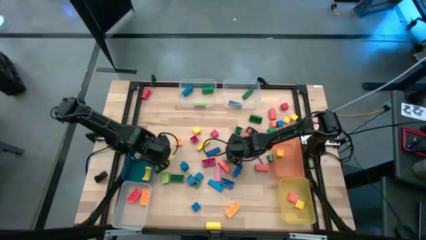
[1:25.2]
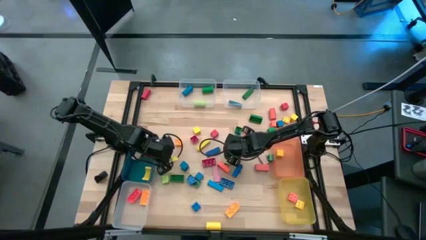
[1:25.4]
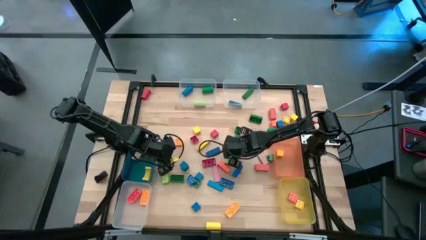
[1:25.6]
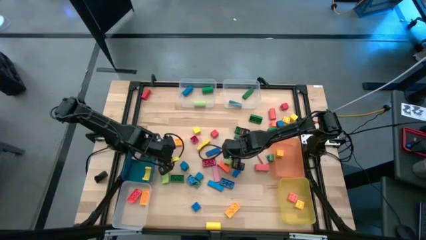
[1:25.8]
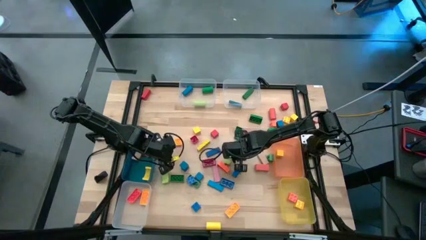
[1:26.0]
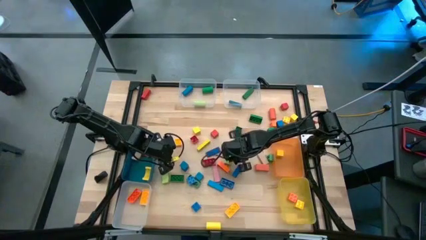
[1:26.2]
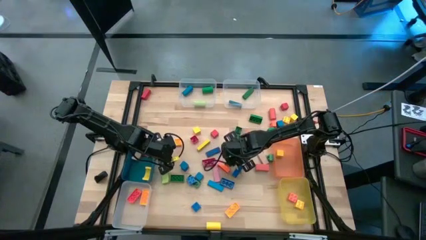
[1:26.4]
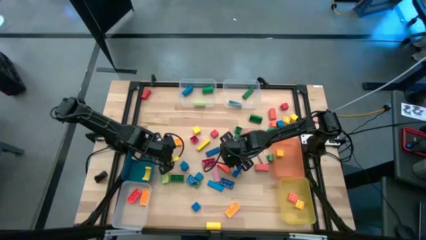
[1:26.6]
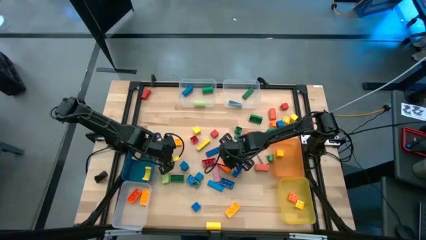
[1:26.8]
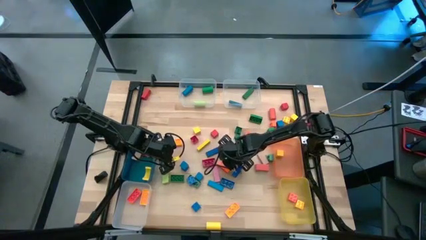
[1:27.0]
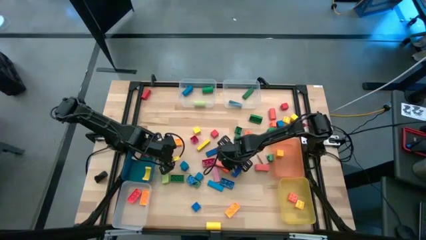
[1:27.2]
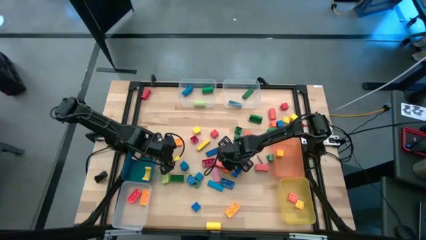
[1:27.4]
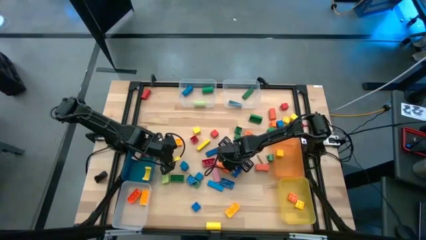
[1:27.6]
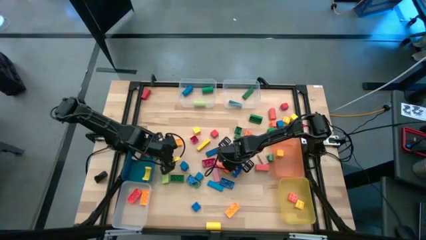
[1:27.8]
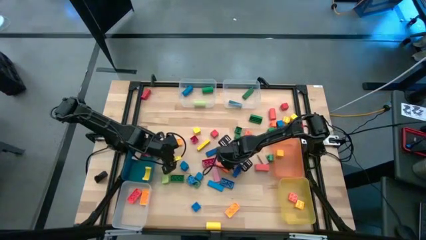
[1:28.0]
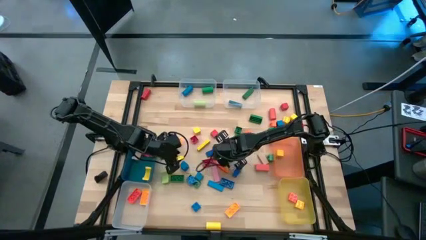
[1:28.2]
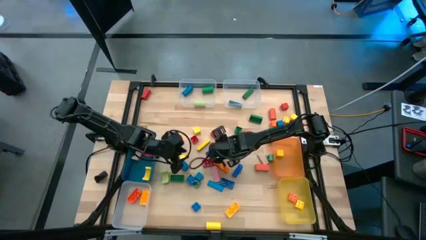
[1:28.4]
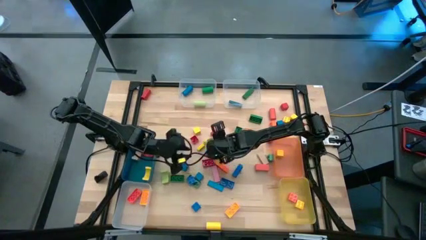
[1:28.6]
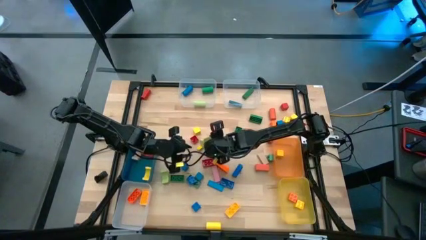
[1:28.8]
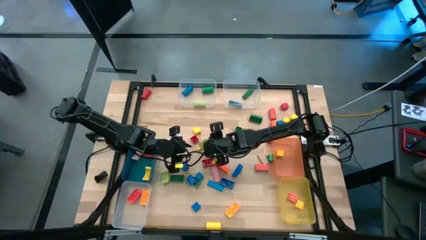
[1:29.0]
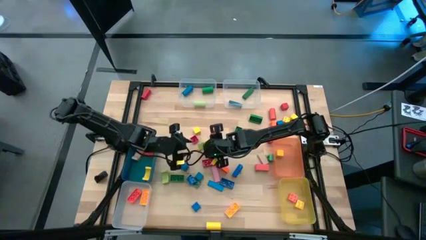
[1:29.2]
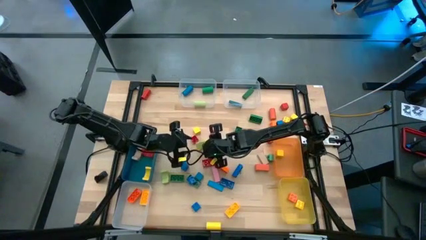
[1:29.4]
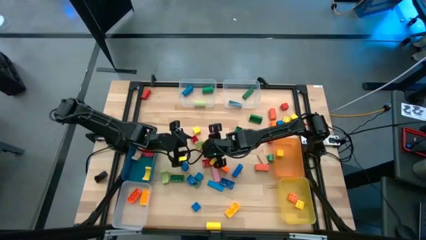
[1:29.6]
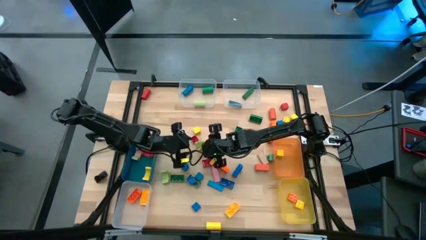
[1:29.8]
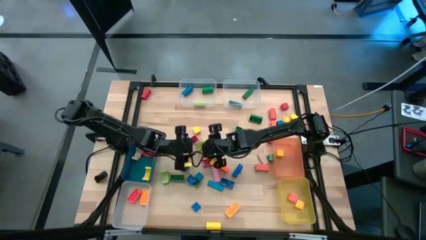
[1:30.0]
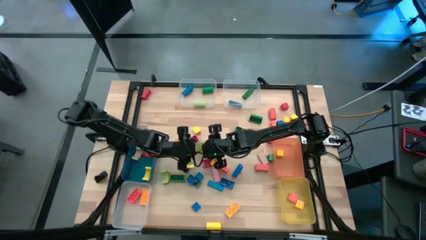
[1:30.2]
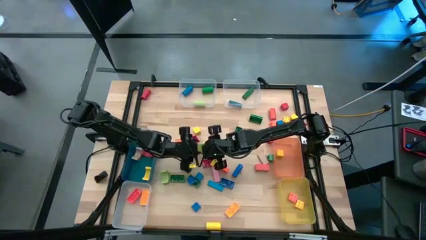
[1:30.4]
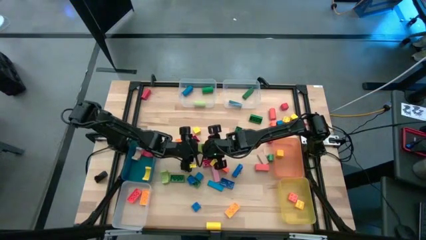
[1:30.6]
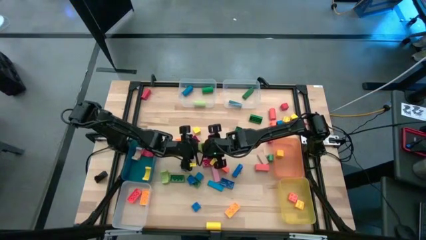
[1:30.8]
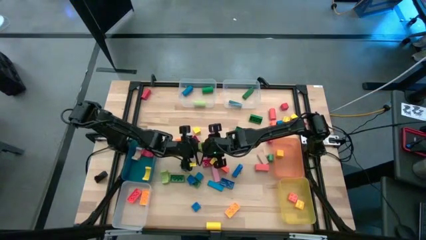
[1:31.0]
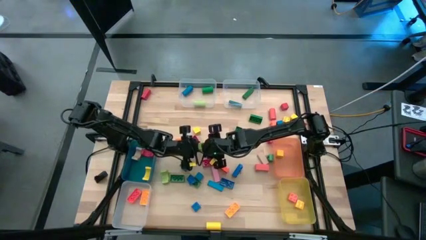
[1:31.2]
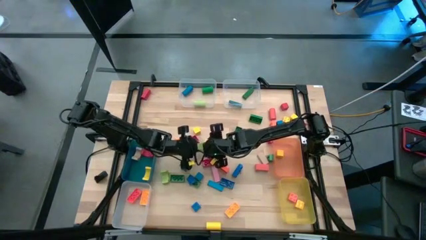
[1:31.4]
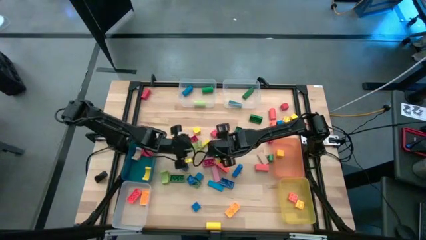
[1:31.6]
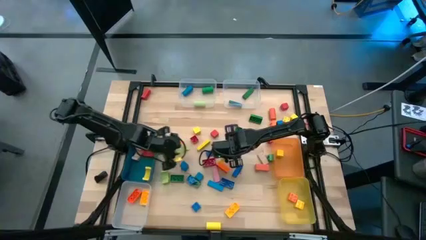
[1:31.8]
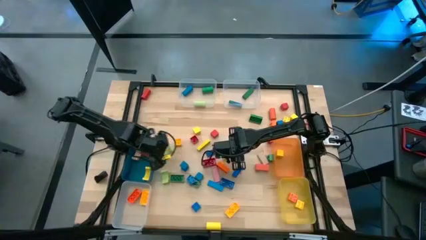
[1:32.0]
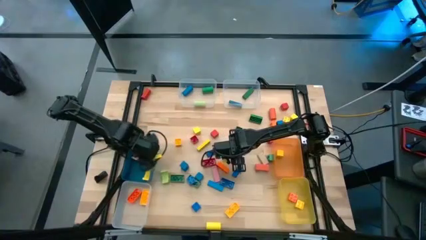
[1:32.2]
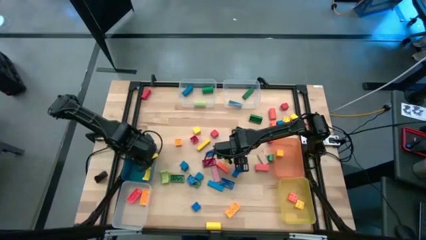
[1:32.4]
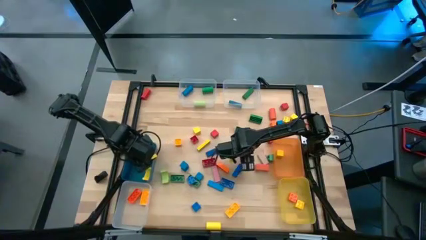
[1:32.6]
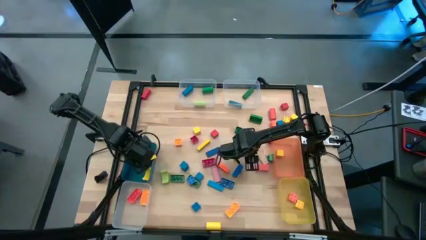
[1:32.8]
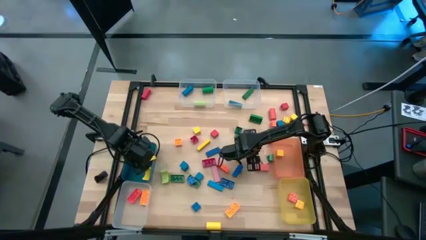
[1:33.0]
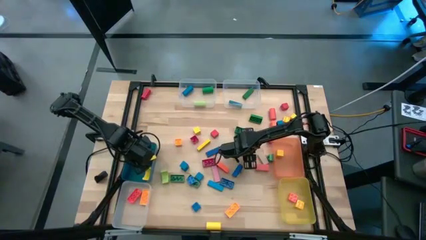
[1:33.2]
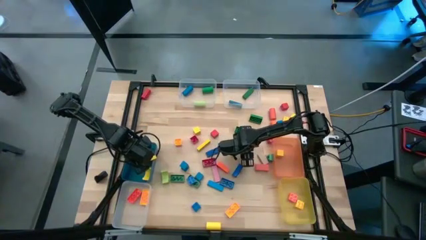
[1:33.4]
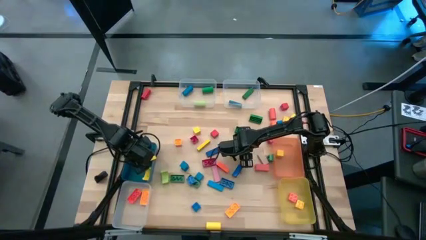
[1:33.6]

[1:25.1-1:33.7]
Task: Sort blocks by size
Put the light green block into the blue bin

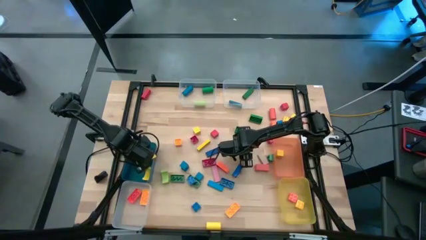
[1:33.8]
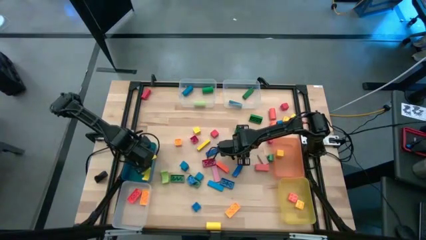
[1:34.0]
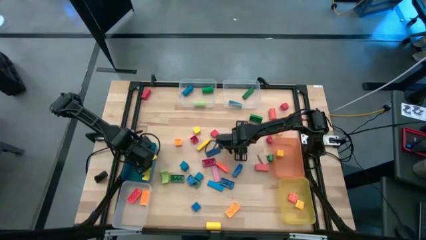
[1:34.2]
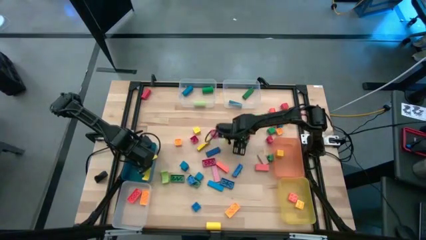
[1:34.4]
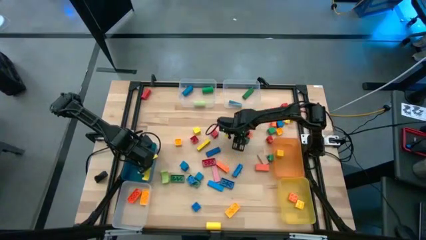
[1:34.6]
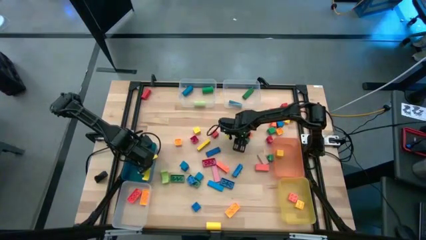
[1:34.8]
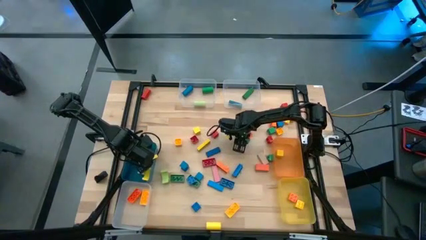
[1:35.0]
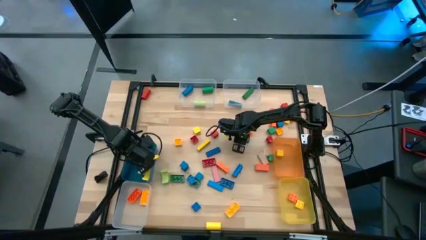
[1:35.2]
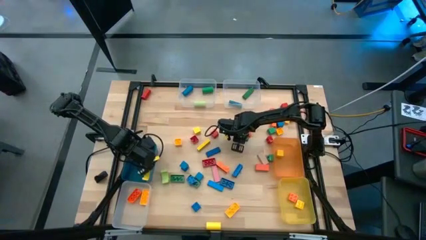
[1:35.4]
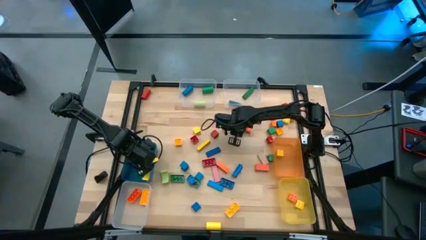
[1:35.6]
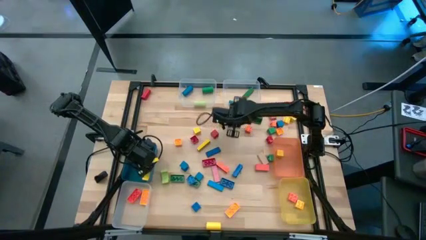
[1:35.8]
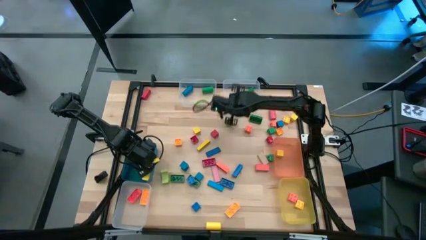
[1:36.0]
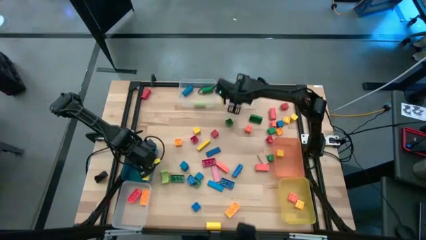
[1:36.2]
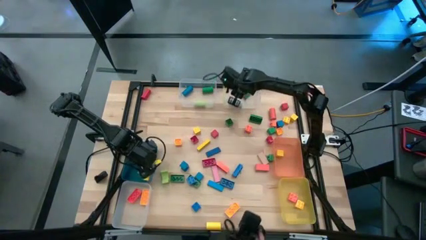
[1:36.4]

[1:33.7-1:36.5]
Put the green block into the top right transparent bin

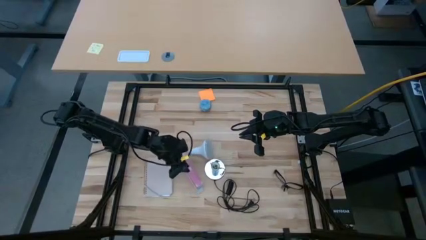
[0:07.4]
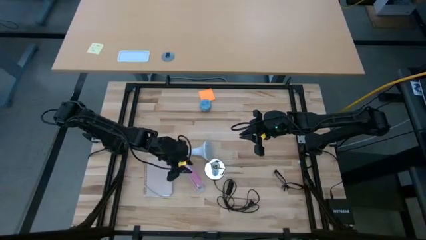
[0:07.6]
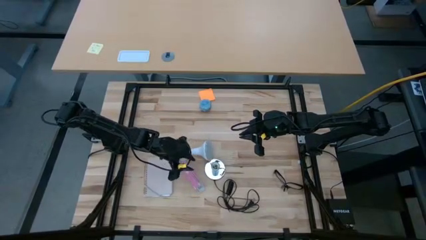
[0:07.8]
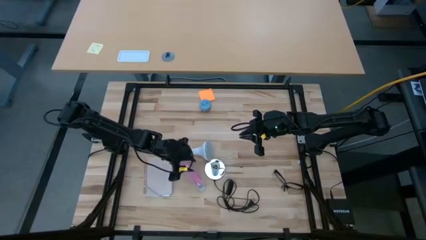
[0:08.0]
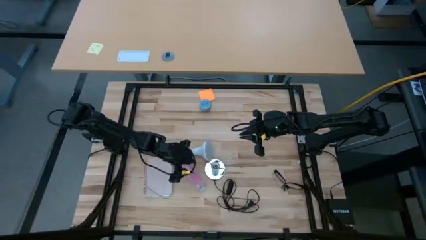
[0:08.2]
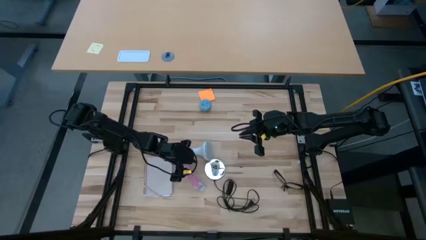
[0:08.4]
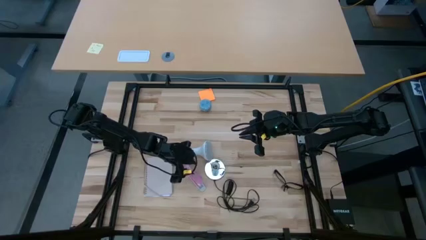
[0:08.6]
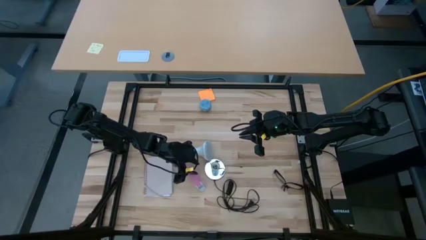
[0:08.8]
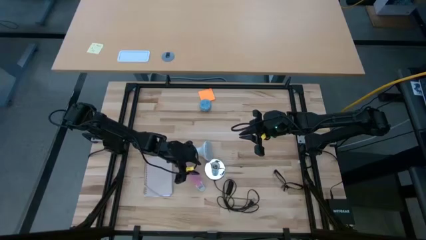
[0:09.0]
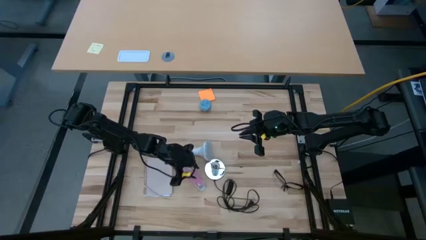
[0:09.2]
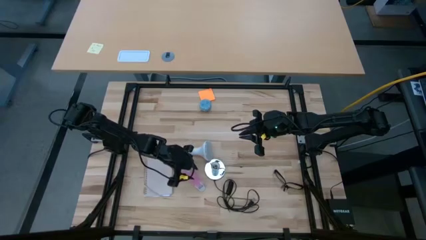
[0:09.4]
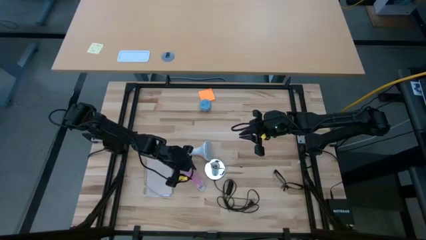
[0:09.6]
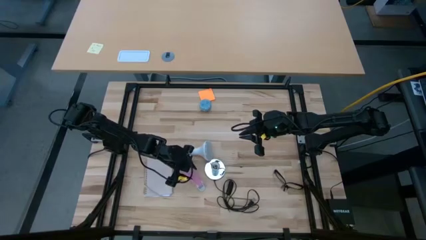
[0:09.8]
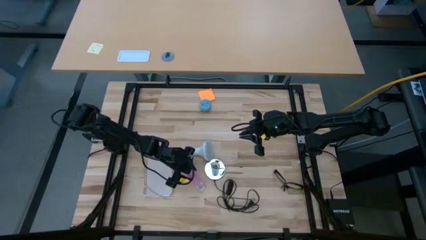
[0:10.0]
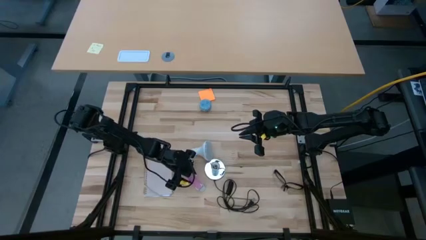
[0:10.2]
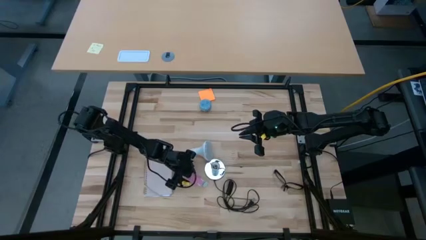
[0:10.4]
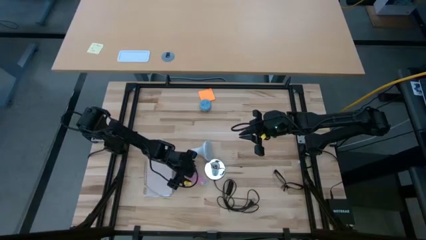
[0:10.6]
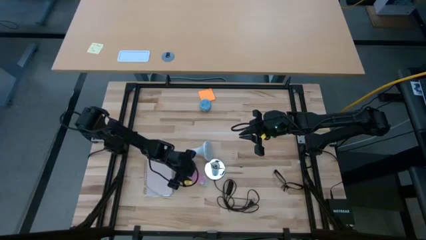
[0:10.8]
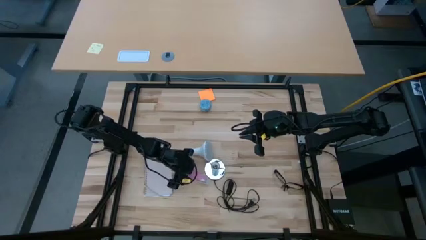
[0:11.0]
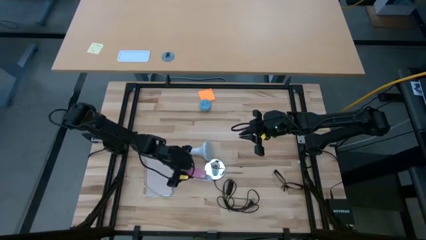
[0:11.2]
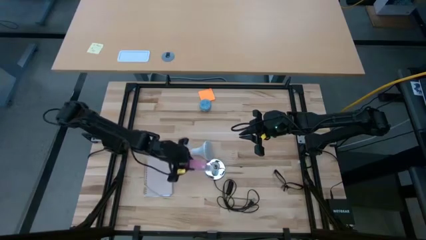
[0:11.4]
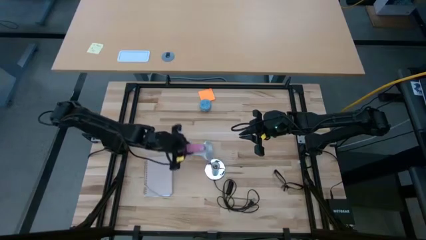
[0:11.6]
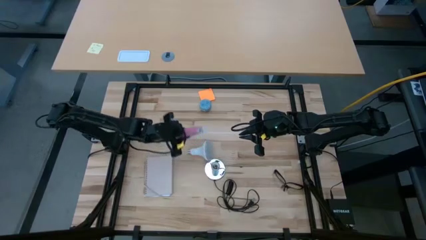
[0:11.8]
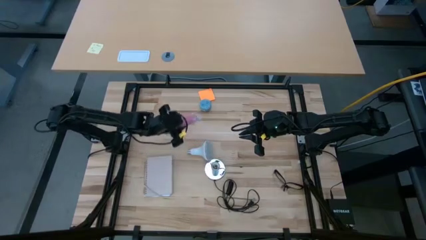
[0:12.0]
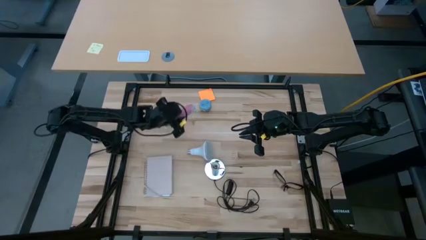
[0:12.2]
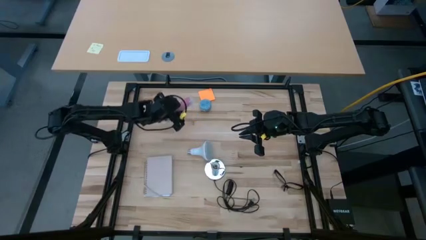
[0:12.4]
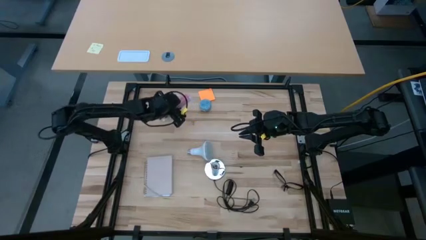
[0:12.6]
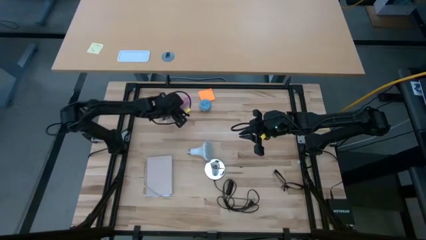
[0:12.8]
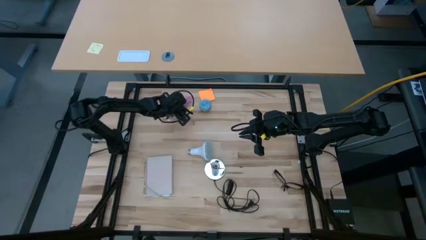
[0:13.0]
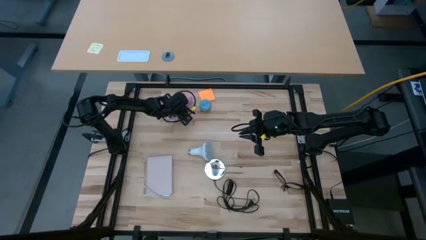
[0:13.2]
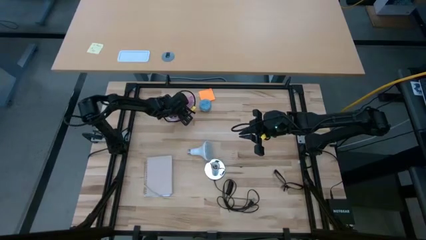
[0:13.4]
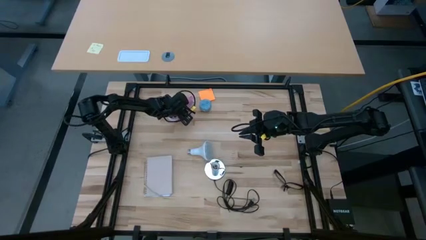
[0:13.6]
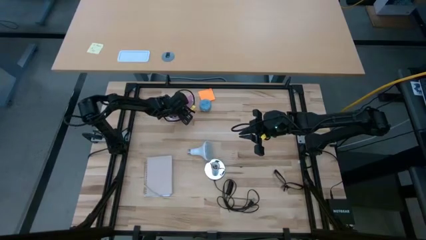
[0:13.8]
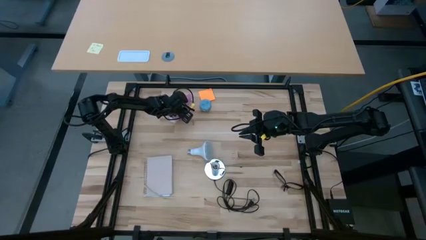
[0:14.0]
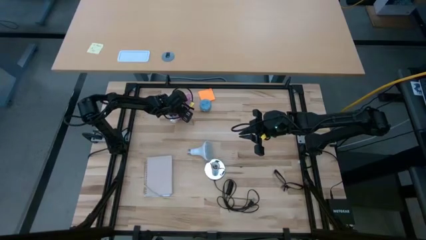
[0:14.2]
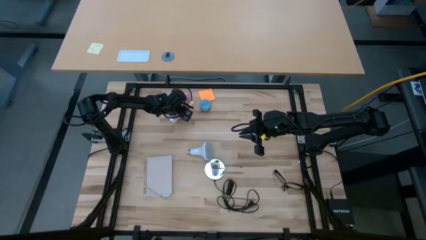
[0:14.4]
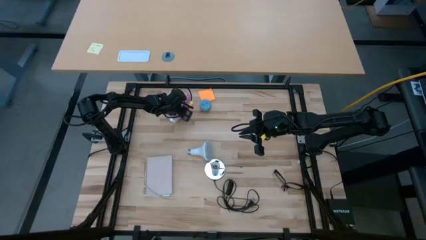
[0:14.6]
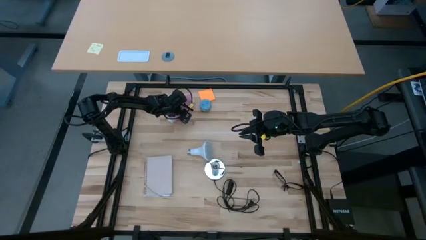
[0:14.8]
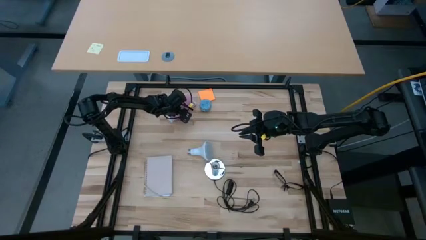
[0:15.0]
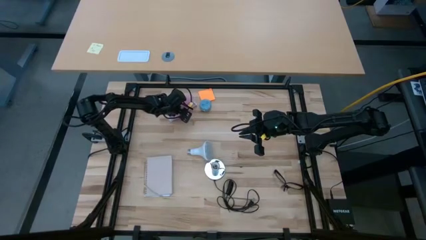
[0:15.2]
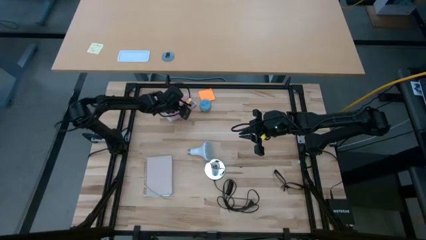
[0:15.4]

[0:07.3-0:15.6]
Task: Screw lightbulb
Move the pink stapler to the top left of the table
